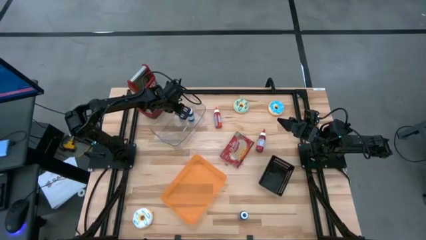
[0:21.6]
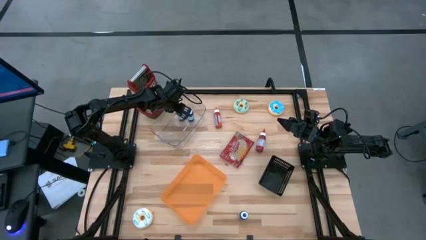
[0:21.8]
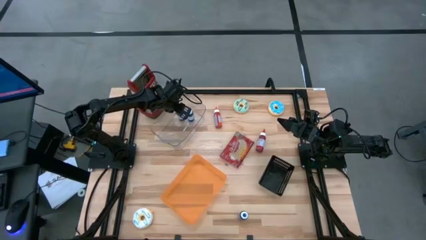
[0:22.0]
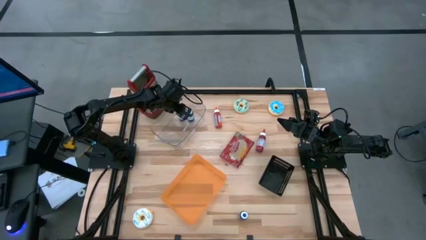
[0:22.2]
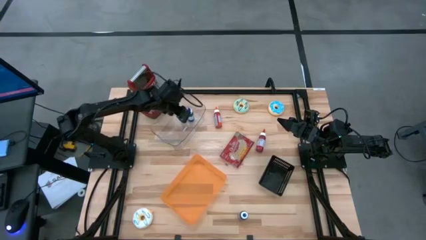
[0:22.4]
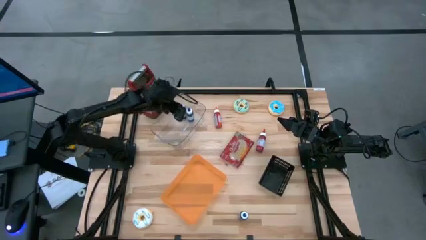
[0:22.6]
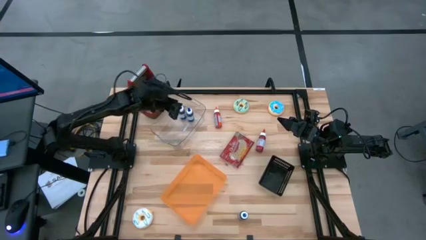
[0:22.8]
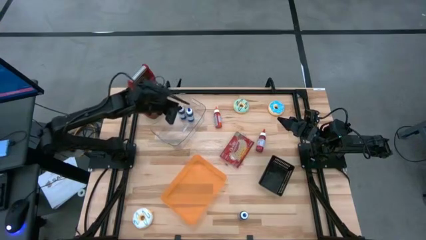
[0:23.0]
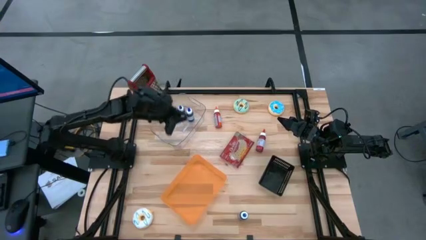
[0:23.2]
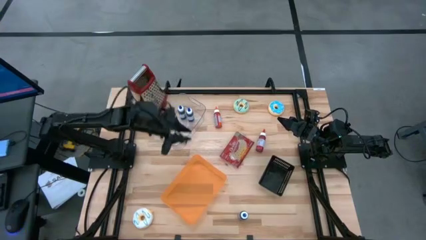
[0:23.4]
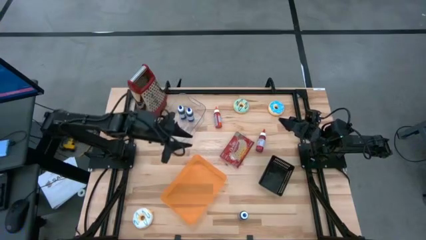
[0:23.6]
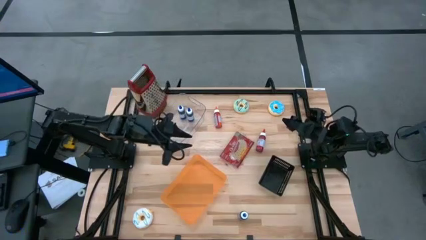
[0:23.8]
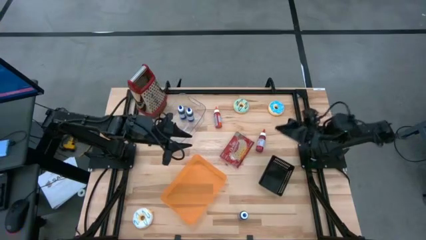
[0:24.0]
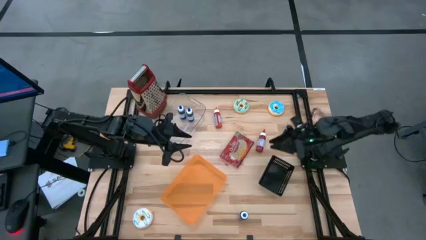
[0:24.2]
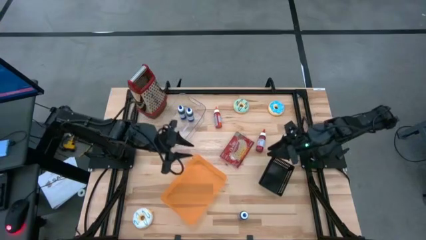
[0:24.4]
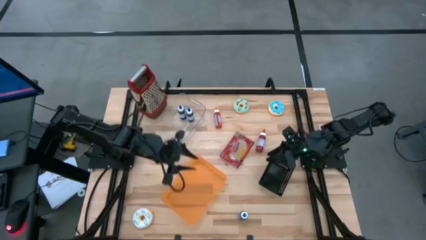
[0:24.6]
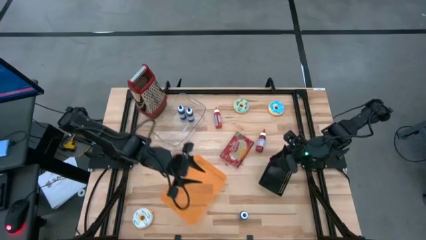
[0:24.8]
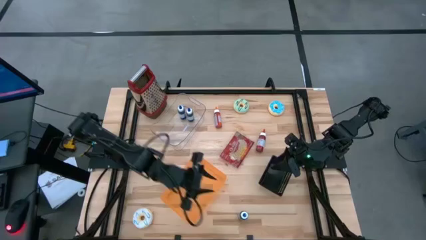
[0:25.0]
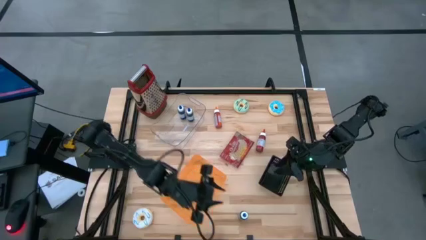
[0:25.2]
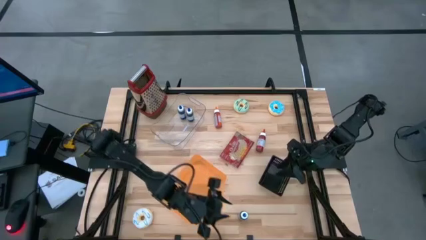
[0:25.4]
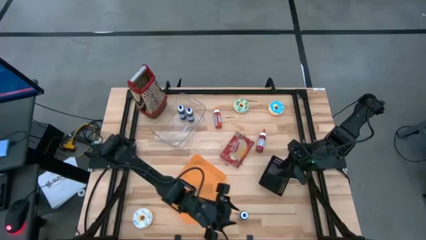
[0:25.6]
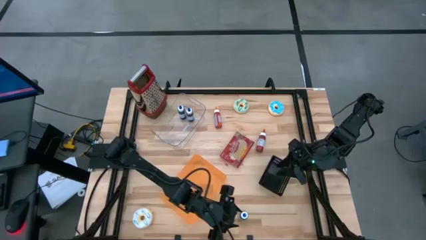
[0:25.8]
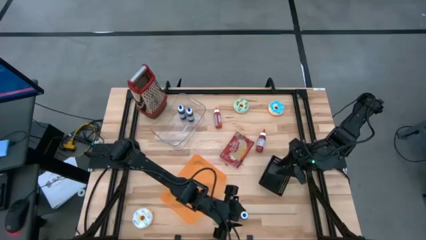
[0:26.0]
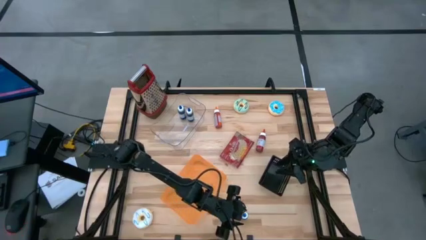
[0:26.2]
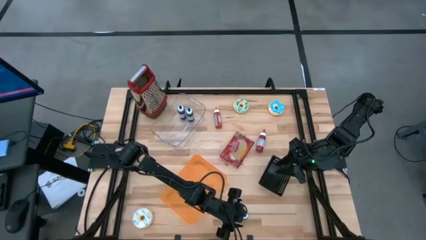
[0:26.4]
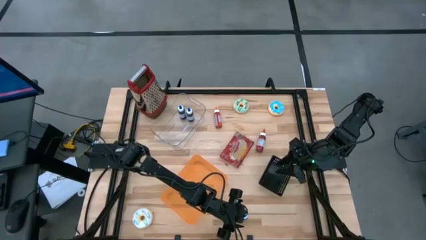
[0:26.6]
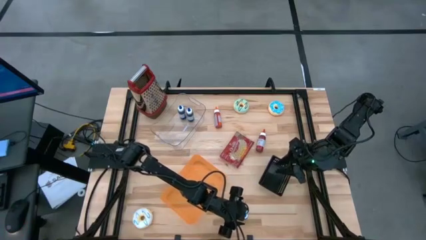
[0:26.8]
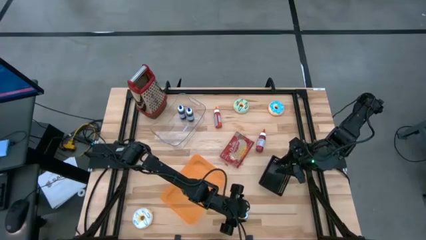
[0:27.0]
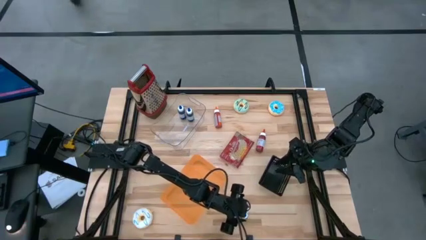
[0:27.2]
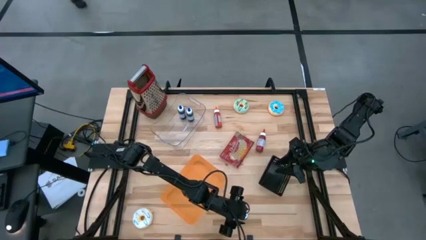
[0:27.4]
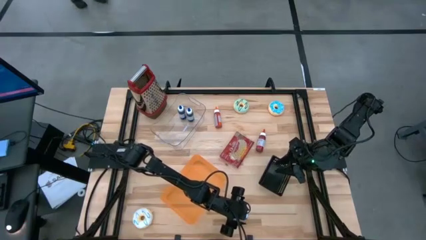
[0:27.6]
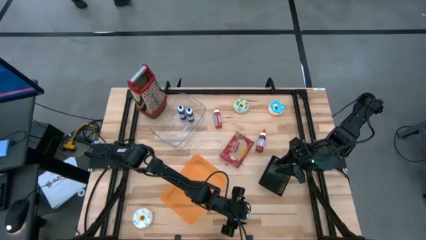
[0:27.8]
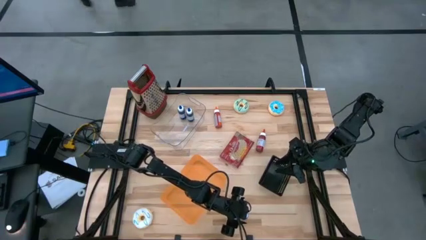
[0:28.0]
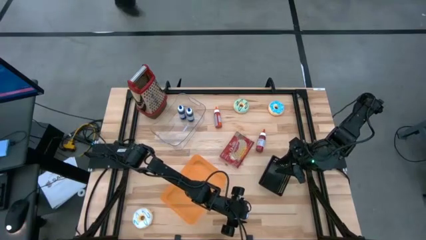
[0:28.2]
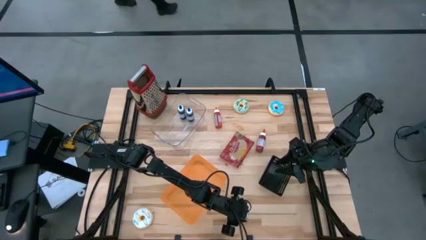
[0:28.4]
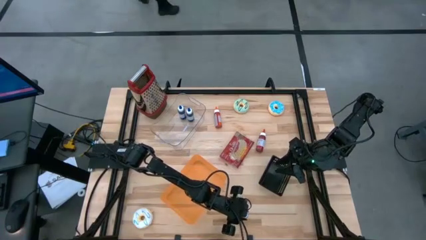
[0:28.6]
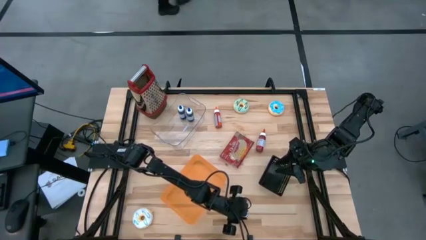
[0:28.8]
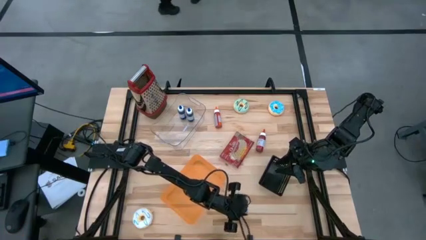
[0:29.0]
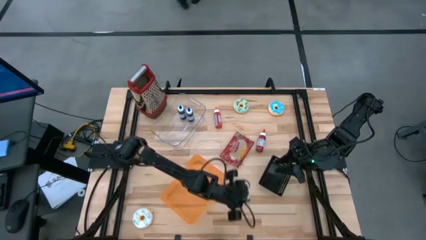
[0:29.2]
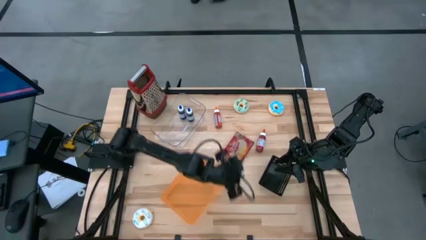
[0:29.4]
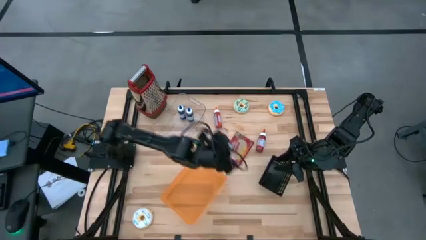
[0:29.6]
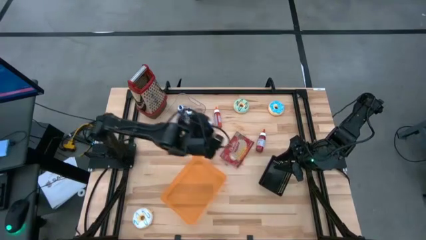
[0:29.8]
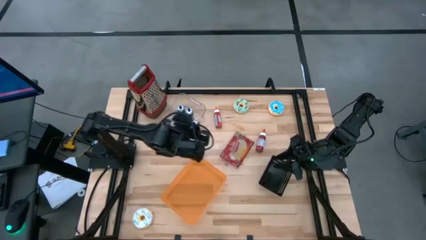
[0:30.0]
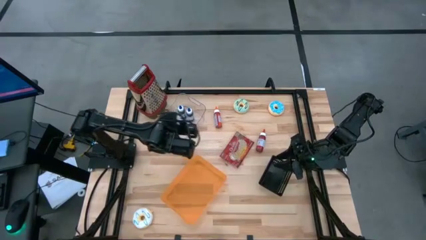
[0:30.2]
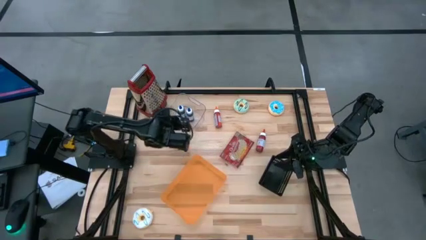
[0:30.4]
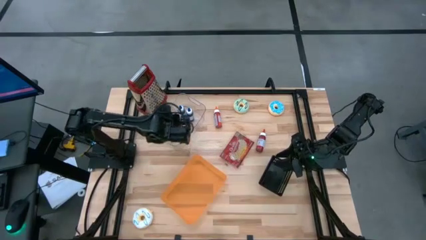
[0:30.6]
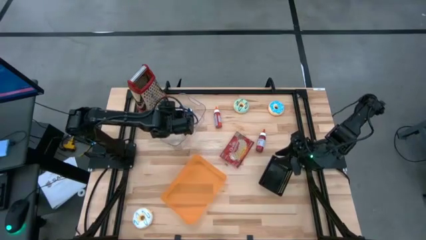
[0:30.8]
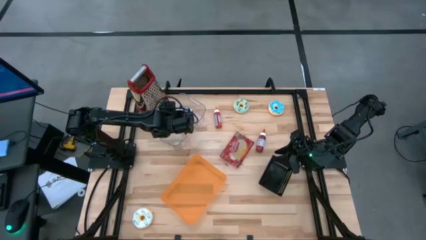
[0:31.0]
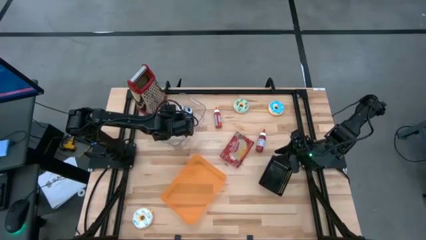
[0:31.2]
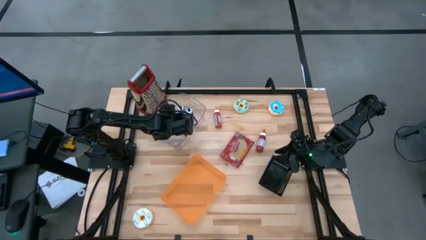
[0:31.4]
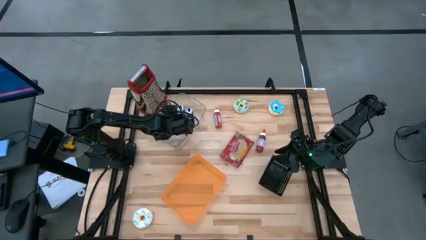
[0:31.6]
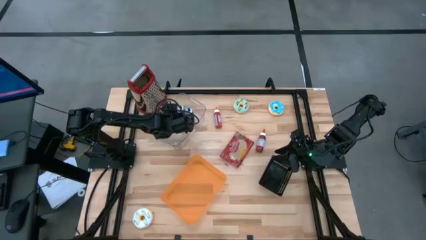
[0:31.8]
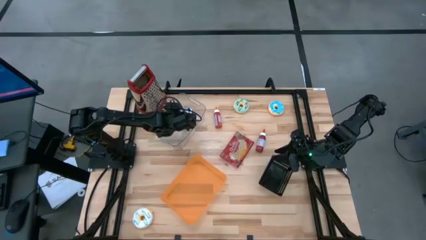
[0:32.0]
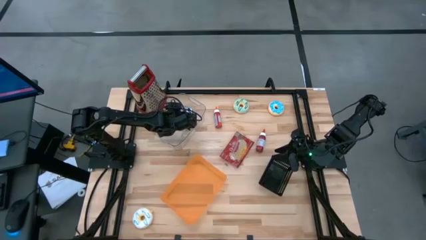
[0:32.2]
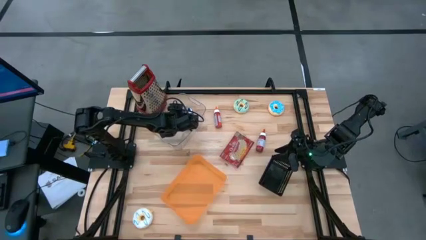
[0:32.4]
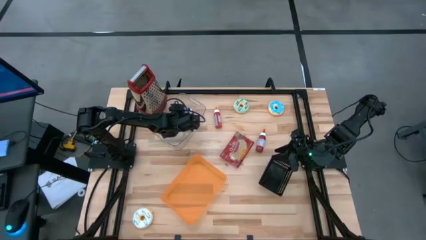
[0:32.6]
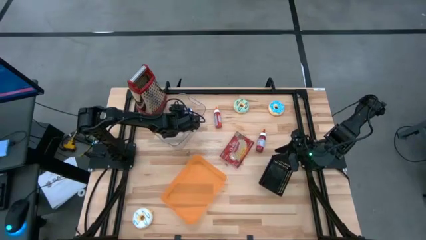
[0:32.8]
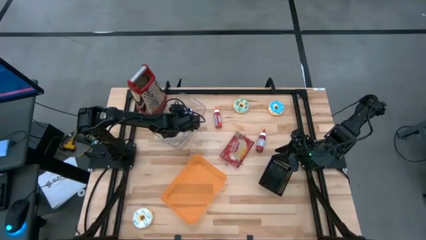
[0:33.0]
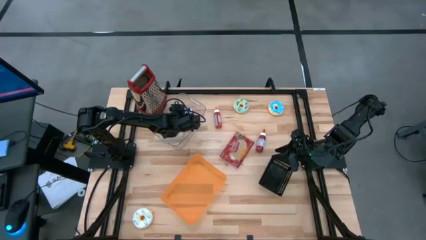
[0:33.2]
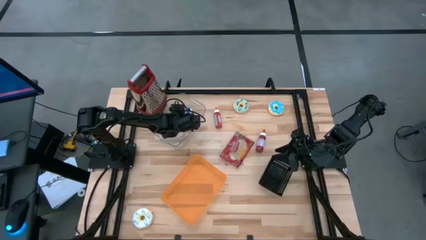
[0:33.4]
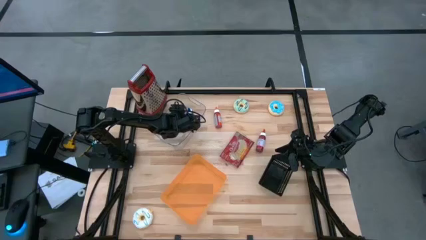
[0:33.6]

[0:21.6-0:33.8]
Put the blue food coloring bottle into the transparent bin
